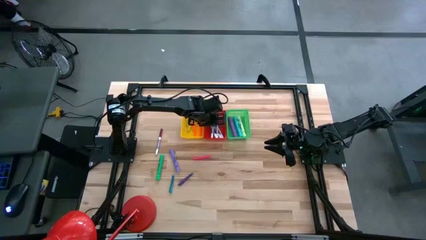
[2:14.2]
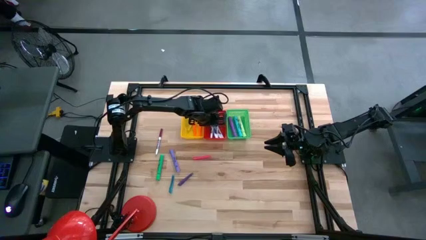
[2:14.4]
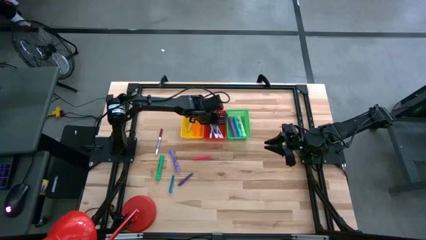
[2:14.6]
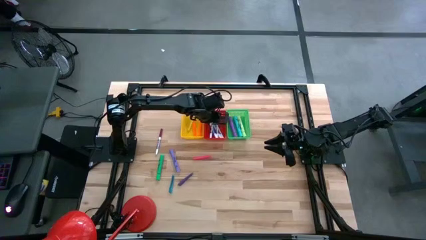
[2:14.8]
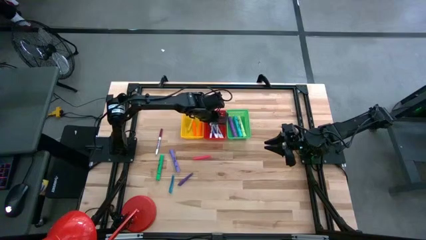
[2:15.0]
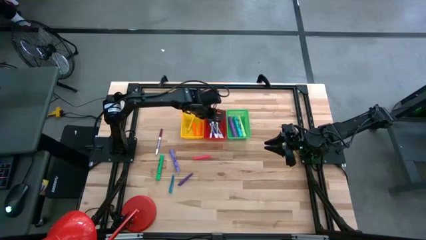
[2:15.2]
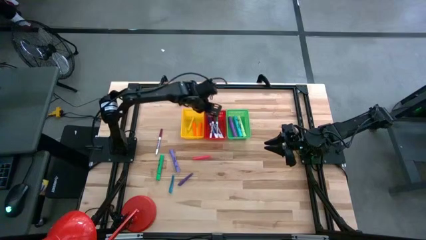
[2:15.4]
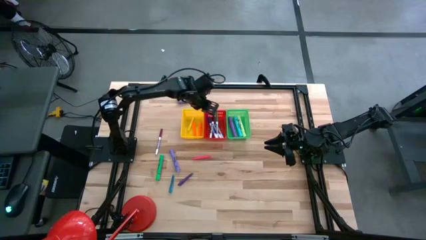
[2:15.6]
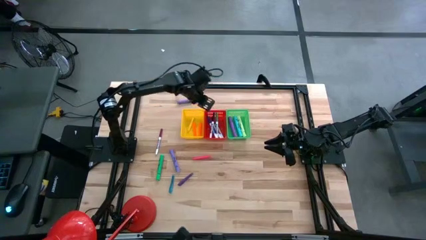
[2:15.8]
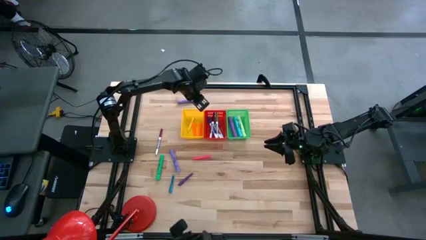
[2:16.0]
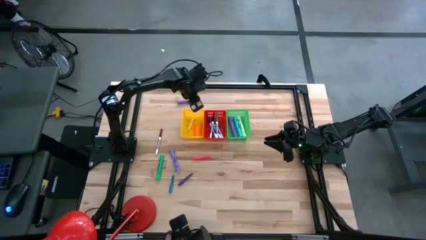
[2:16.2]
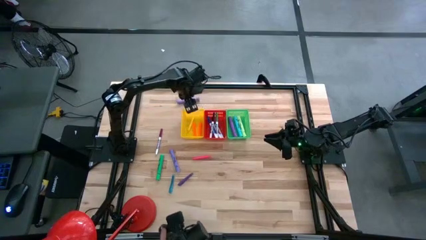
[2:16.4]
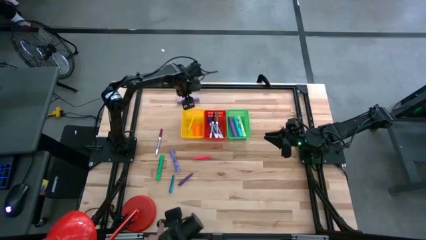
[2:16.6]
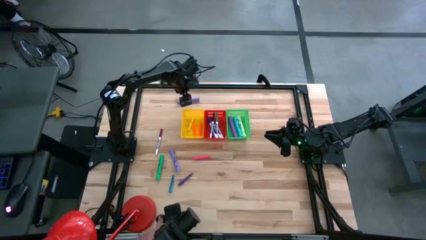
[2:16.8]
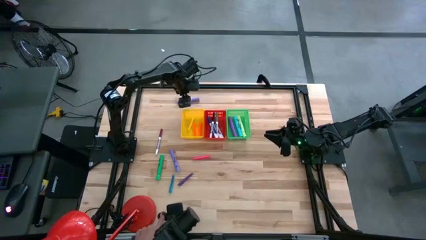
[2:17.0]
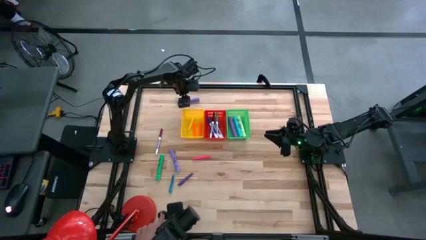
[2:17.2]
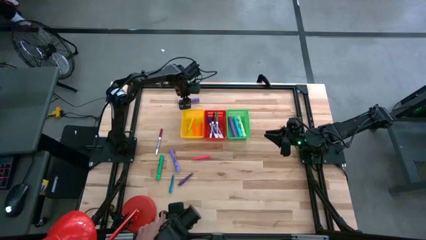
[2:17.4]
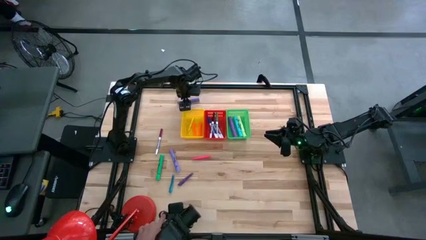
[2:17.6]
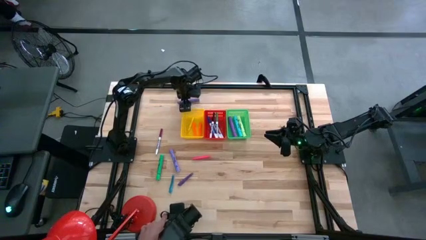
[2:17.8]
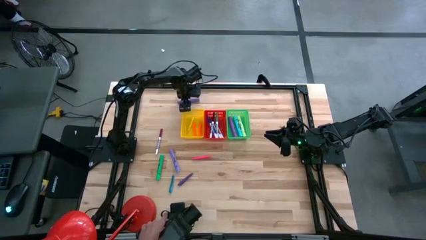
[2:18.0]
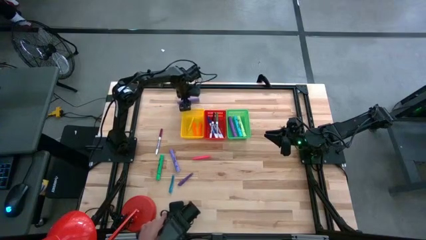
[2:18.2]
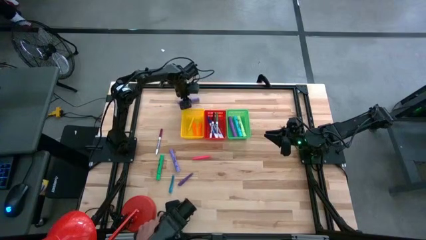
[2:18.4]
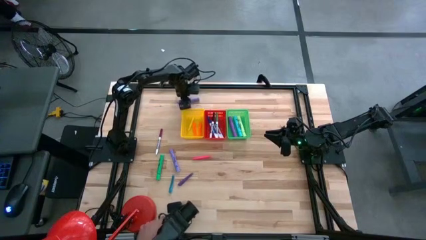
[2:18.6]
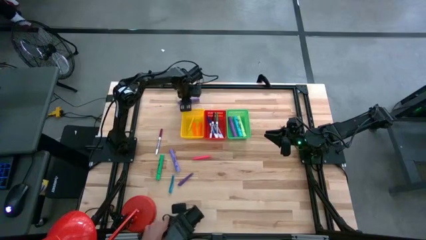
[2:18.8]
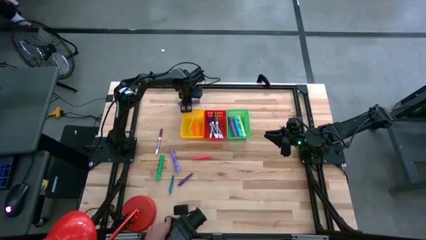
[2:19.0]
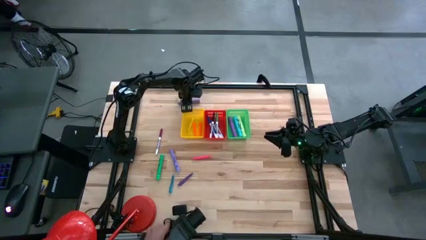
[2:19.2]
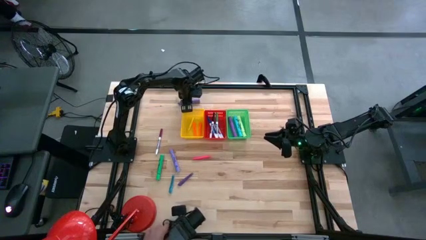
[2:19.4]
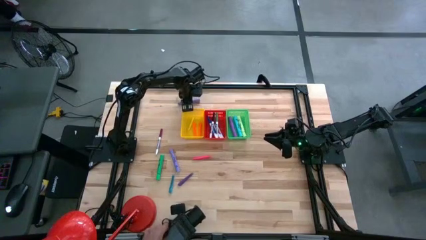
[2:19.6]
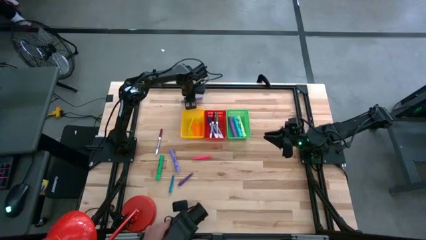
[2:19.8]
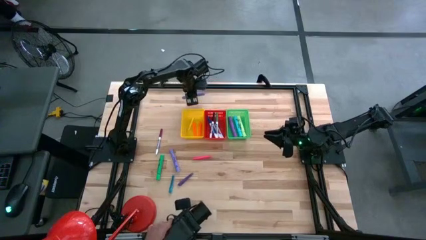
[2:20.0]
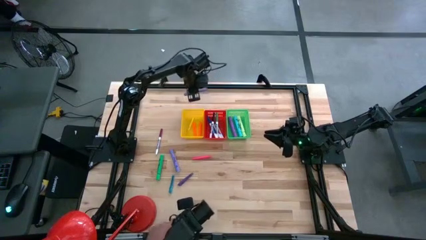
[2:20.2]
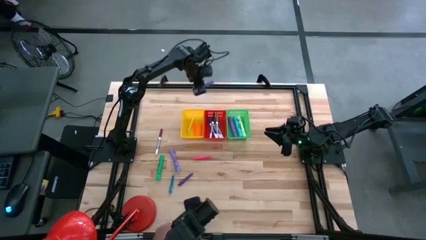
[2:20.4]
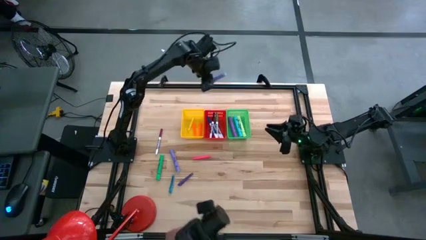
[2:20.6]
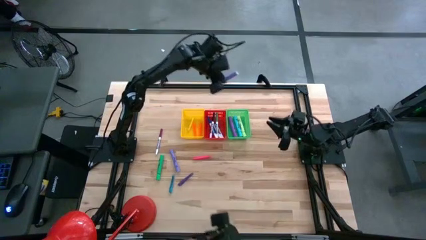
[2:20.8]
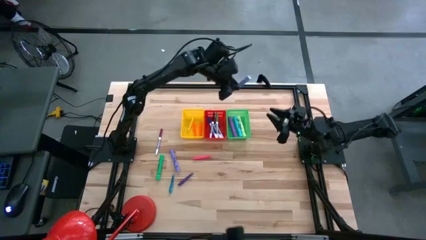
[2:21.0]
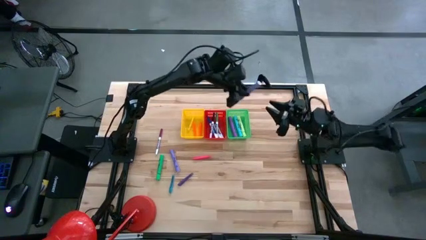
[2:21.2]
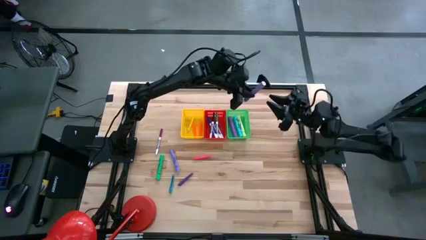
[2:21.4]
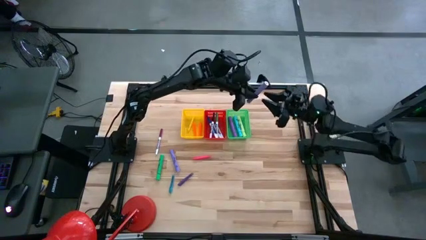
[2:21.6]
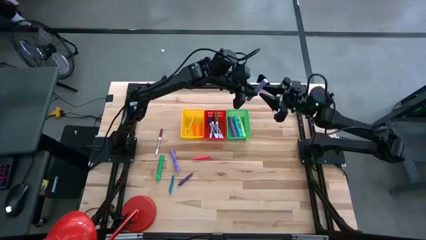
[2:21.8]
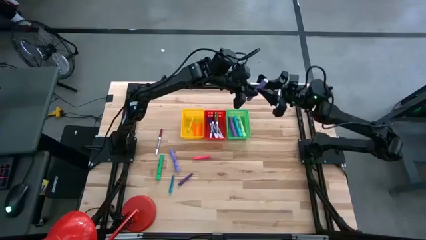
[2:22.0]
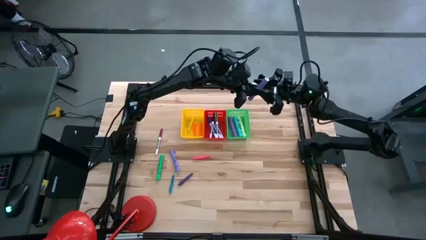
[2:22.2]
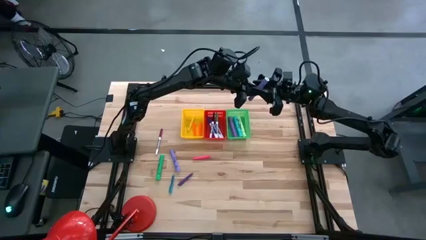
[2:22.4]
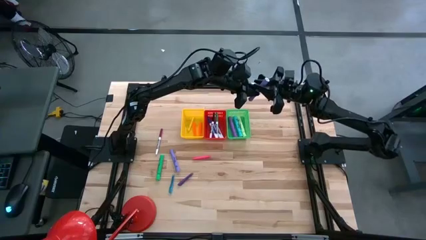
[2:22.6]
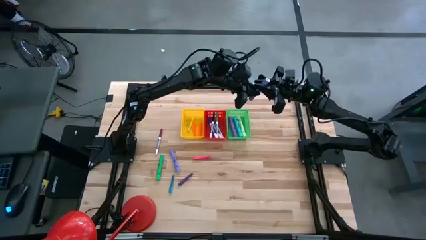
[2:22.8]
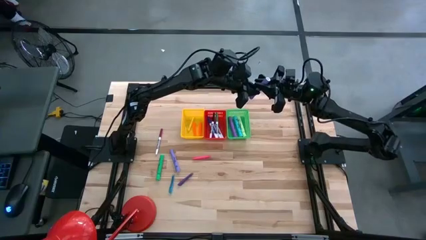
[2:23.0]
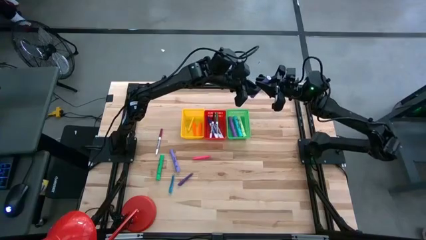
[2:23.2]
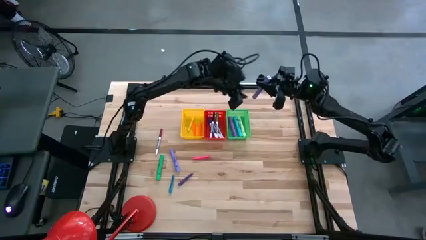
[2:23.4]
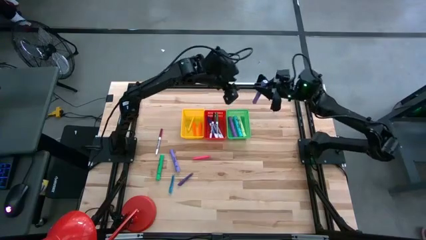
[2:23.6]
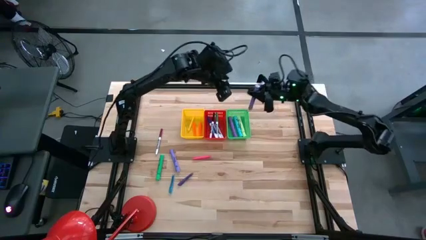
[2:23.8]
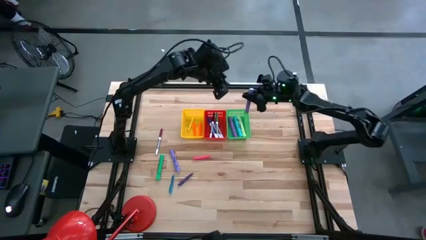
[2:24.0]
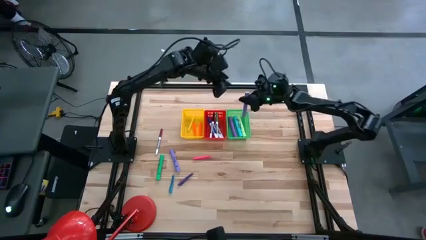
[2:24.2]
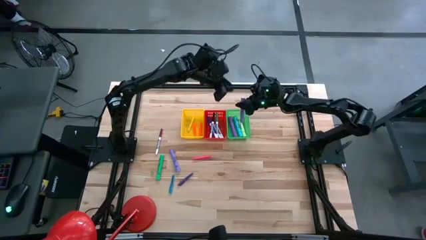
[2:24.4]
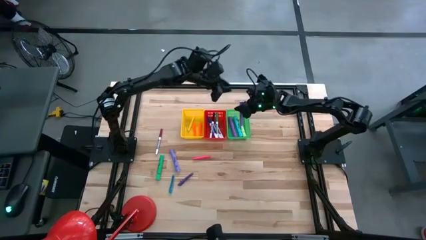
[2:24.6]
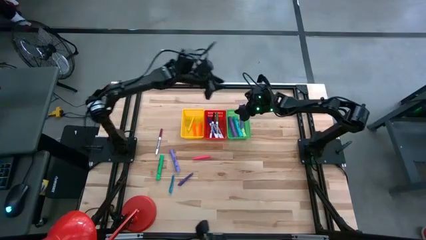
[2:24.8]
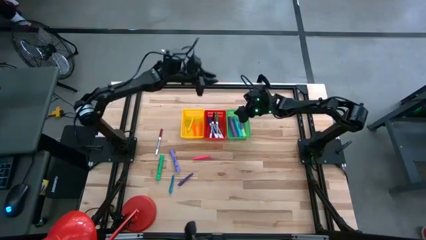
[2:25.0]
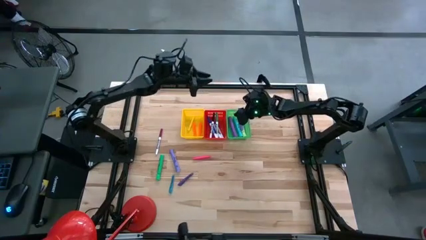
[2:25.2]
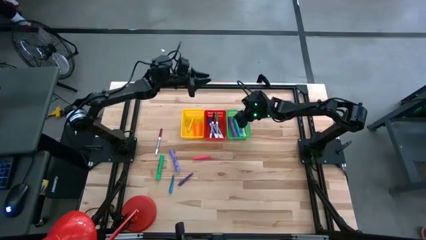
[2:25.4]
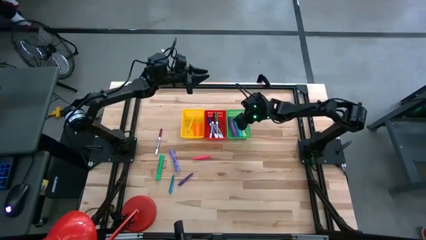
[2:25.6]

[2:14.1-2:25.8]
Task: Pick & Place Markers
Put the top purple highlighter into the green bin
